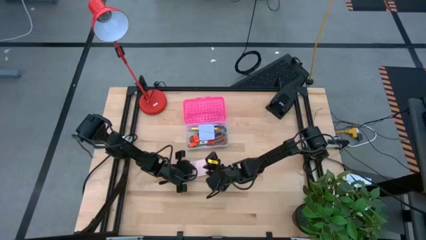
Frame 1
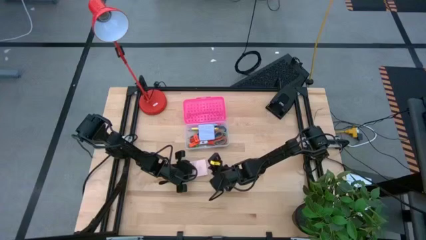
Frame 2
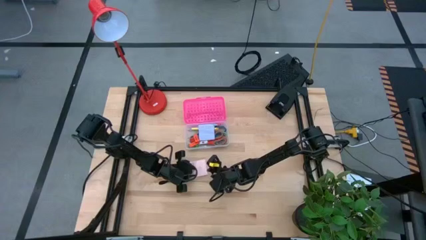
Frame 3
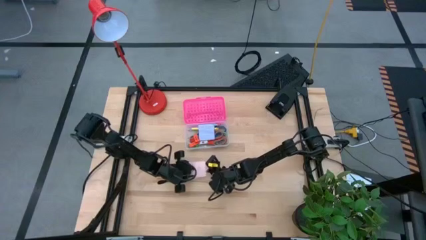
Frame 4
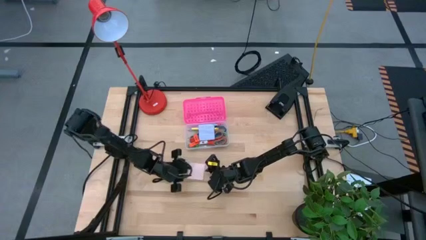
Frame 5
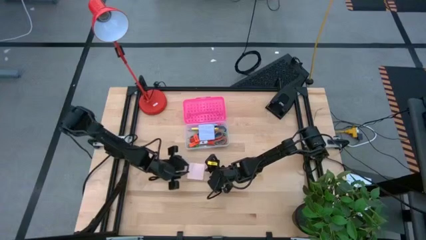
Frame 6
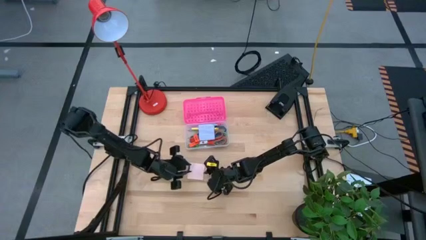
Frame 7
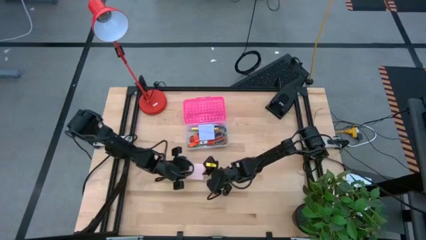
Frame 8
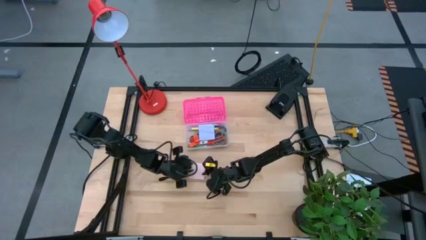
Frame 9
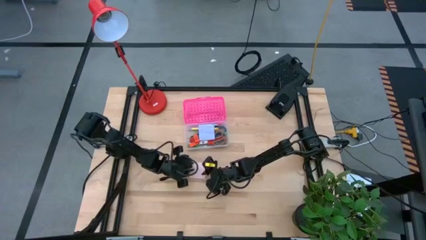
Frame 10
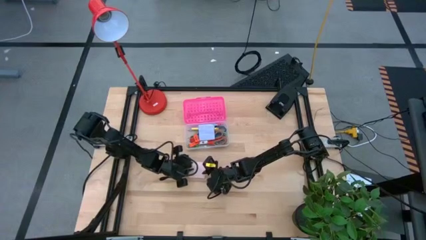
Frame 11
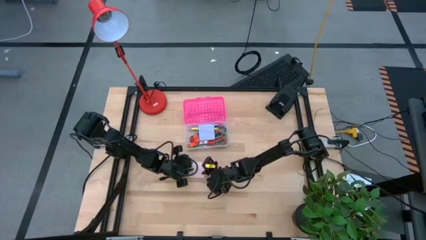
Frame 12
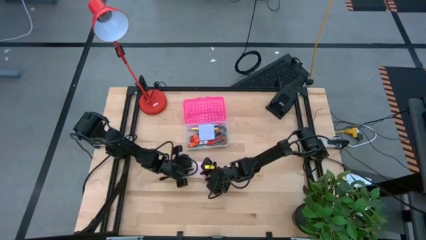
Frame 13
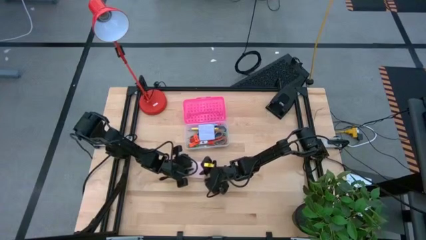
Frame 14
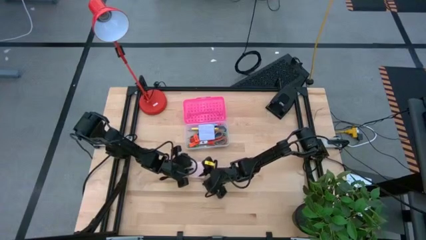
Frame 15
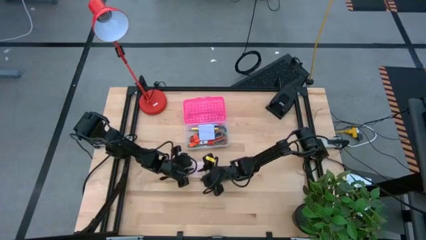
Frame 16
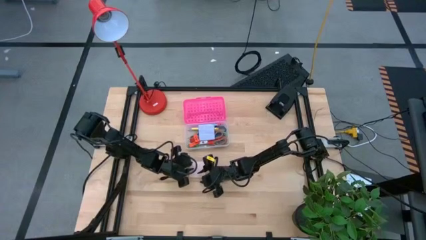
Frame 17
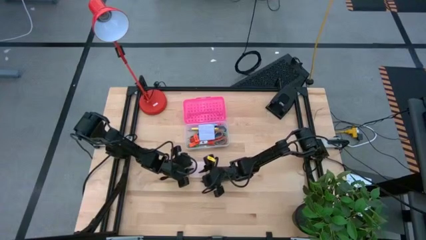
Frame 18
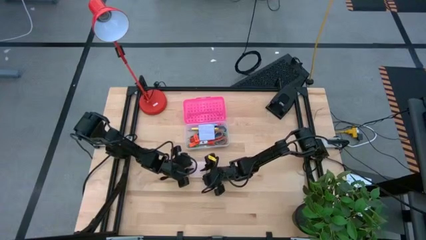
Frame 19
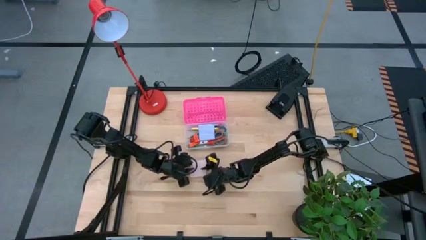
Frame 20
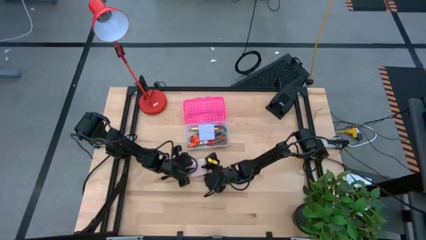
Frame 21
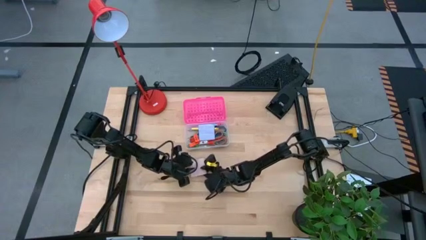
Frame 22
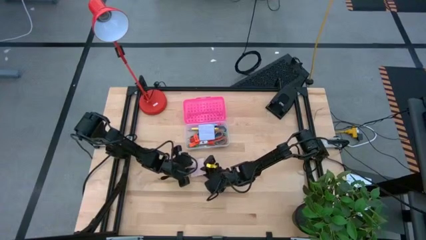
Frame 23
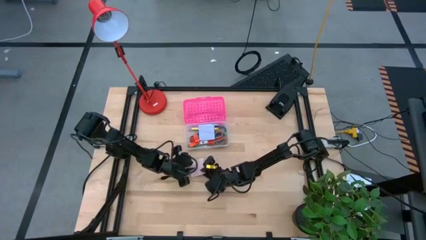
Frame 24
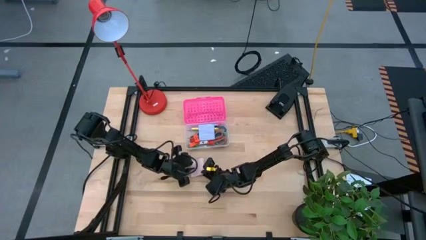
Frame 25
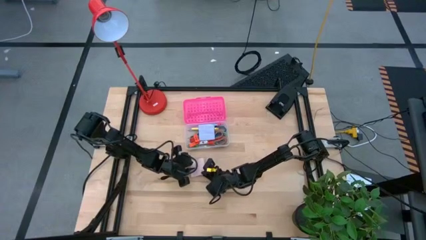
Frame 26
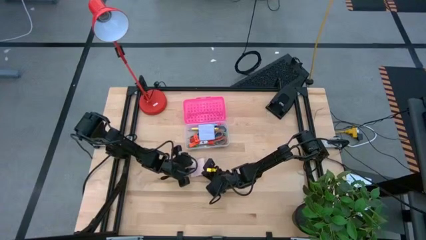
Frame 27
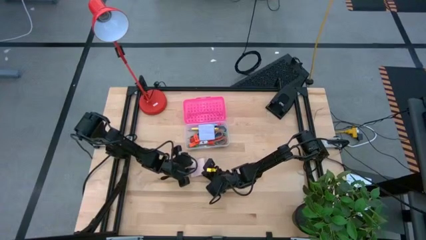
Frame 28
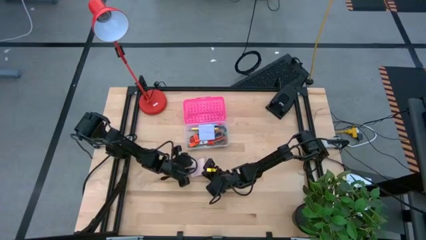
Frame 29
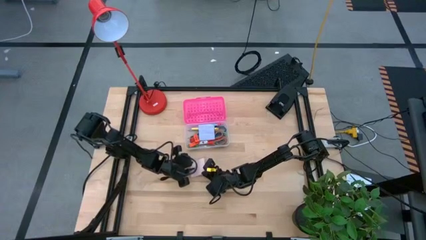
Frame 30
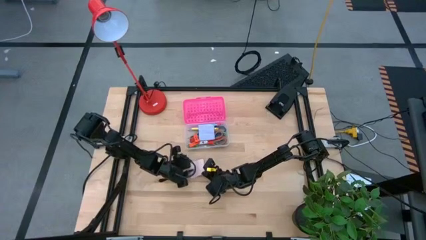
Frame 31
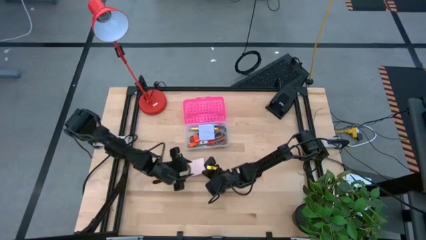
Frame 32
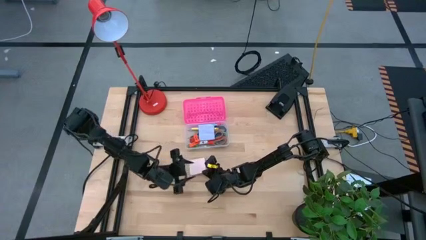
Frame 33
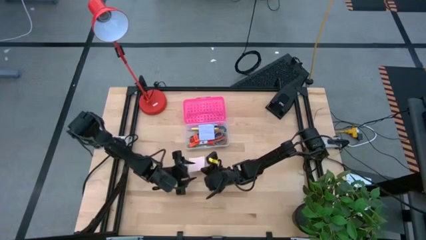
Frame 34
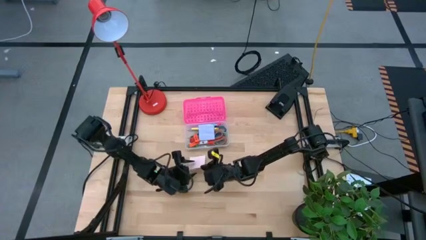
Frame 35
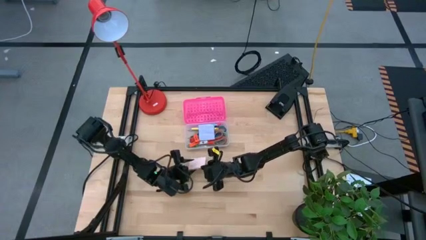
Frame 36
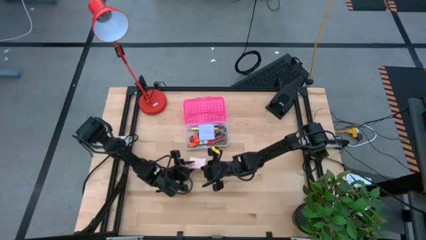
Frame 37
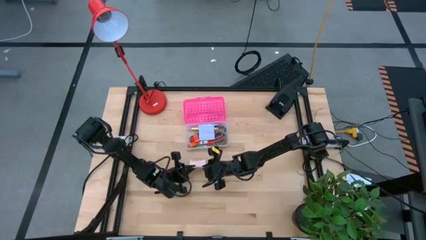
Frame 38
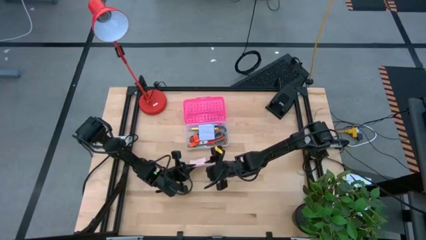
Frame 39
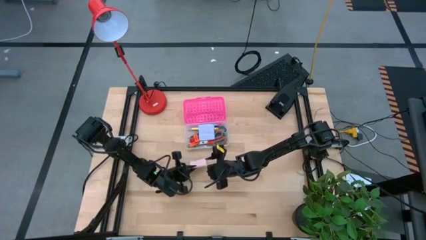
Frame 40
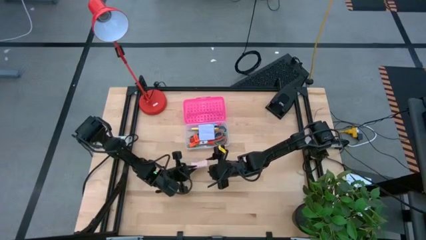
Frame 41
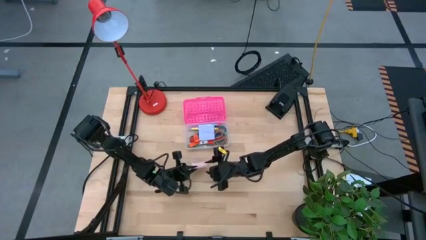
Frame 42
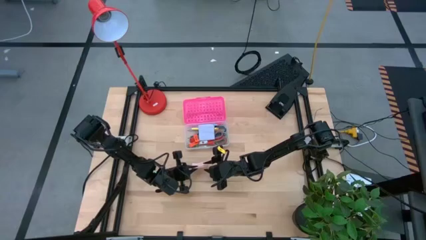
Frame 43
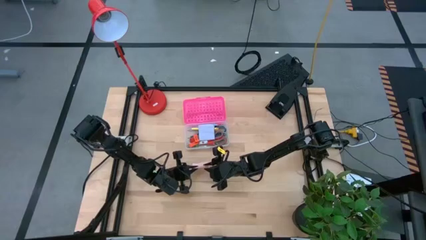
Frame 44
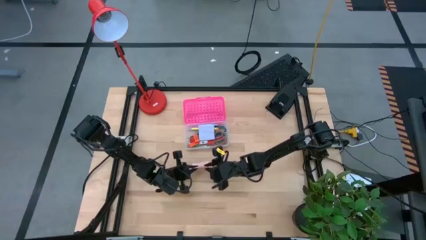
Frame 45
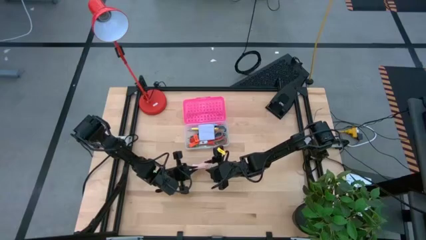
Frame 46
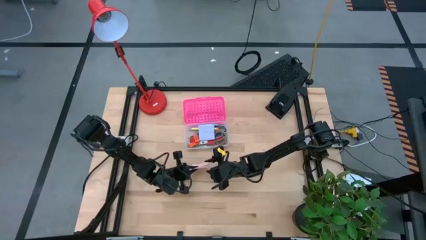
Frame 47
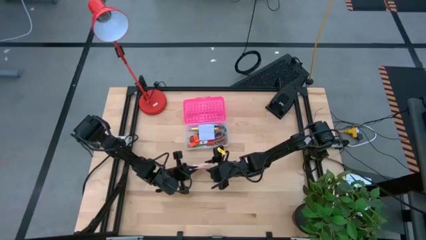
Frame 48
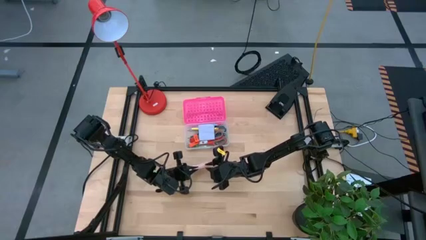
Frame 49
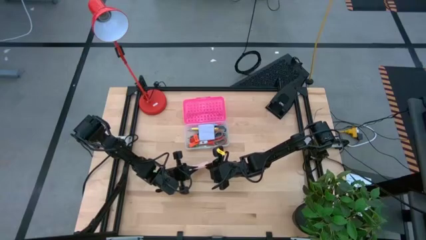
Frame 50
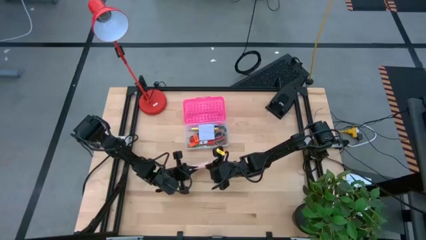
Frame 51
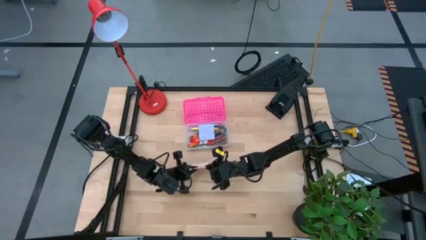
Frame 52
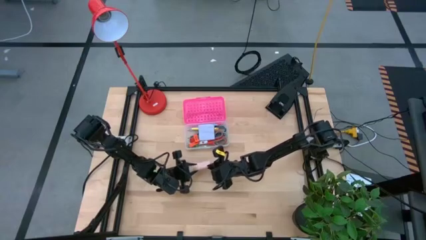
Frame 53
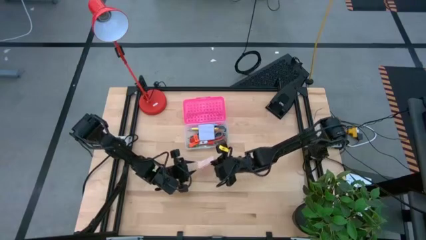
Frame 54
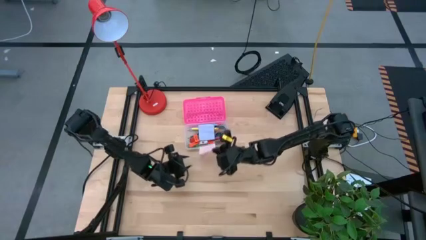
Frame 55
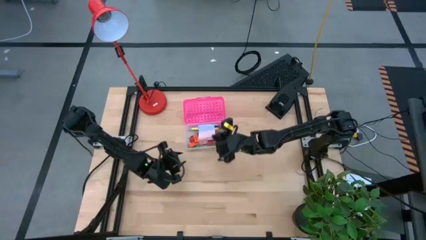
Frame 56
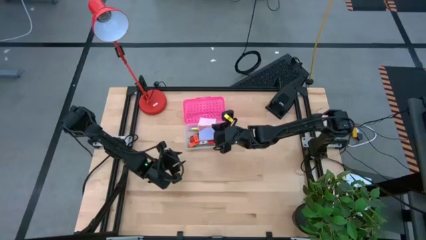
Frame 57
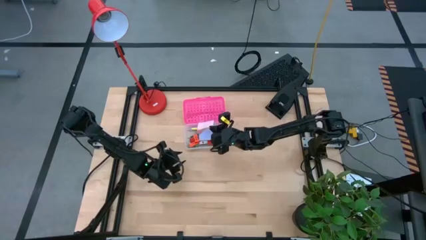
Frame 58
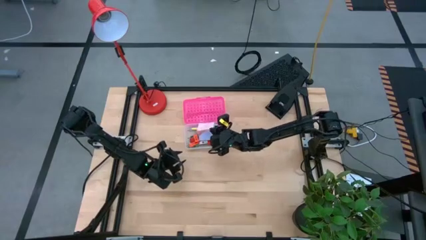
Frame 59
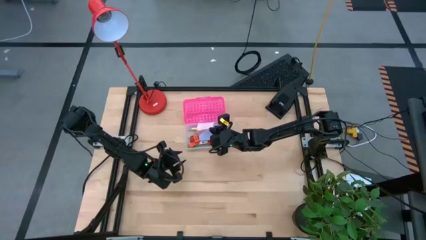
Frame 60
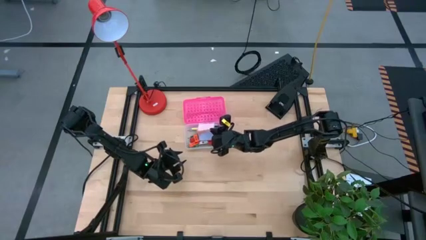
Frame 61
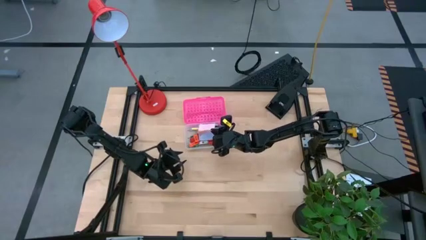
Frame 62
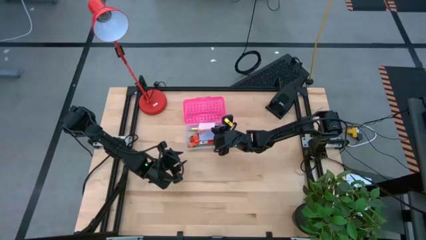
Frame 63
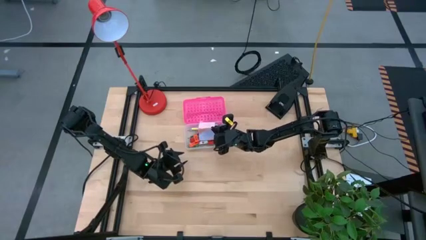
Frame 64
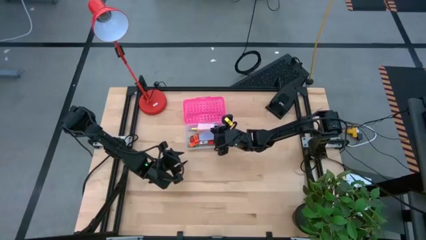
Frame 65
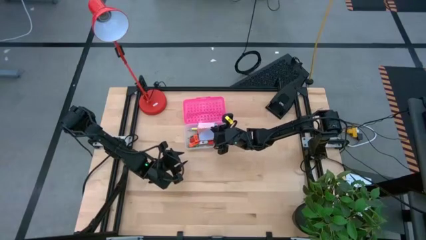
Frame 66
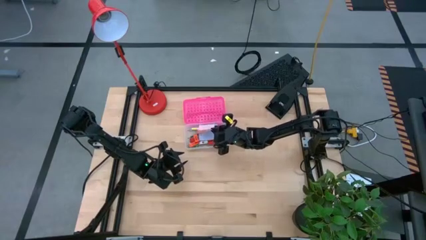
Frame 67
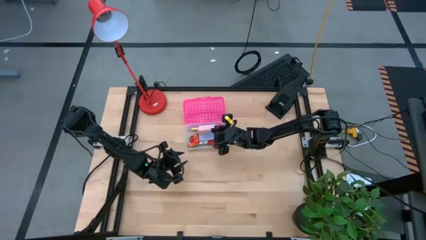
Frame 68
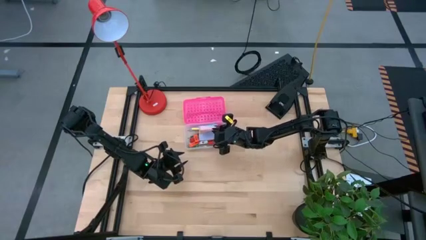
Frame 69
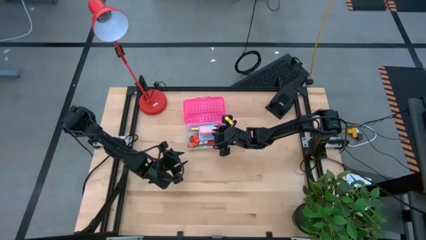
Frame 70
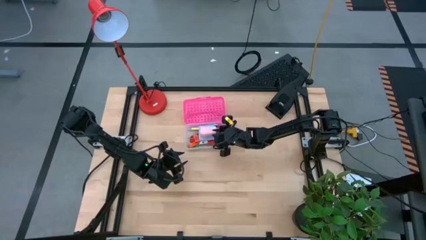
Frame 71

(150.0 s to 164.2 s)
Task: Pack school essentials
Put the light pink sticky note into the pink supply box
